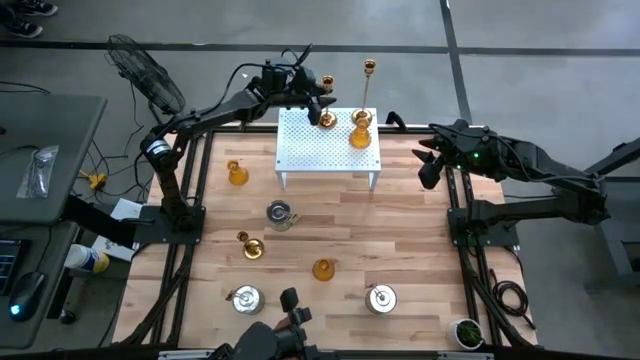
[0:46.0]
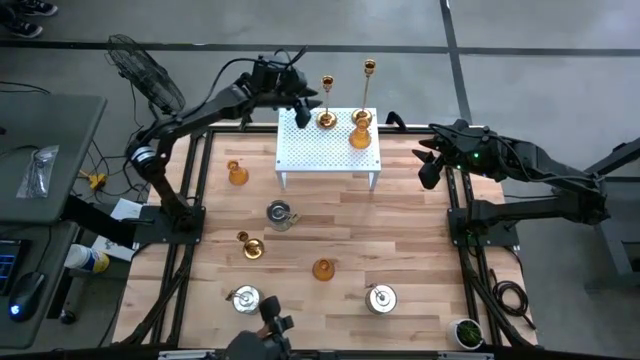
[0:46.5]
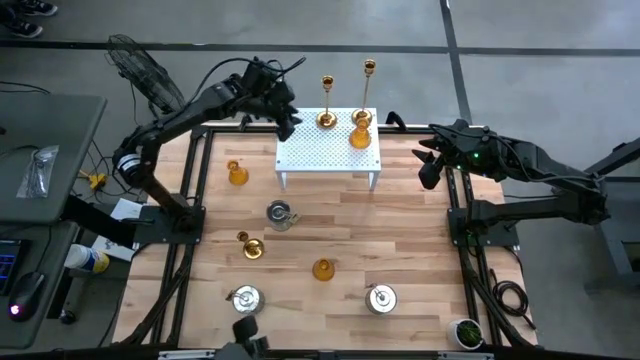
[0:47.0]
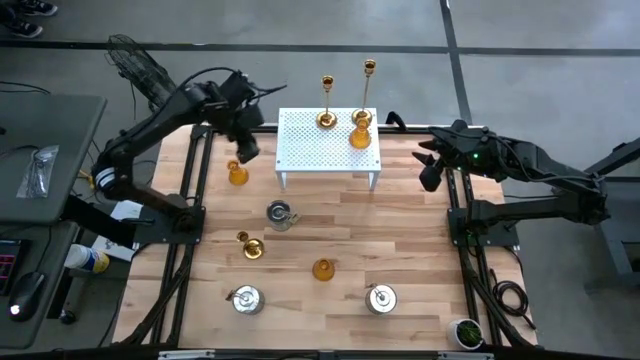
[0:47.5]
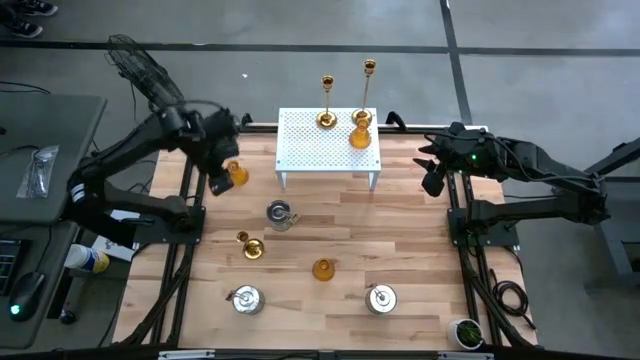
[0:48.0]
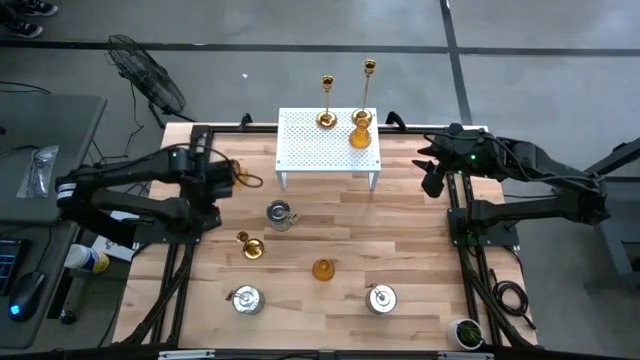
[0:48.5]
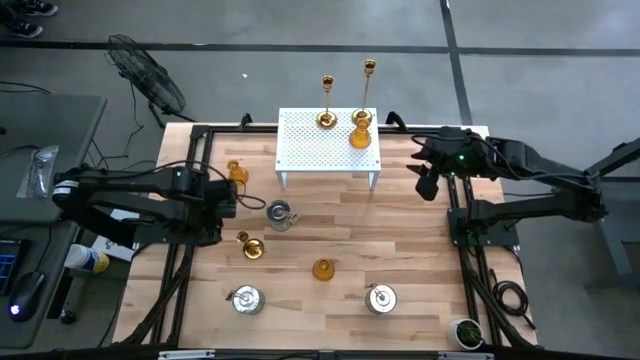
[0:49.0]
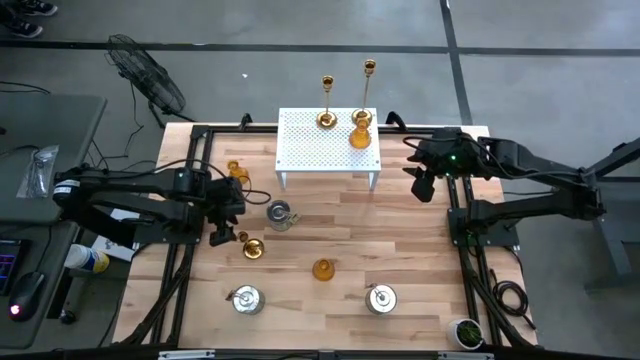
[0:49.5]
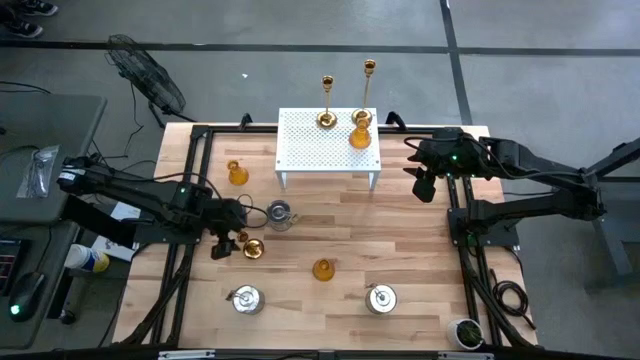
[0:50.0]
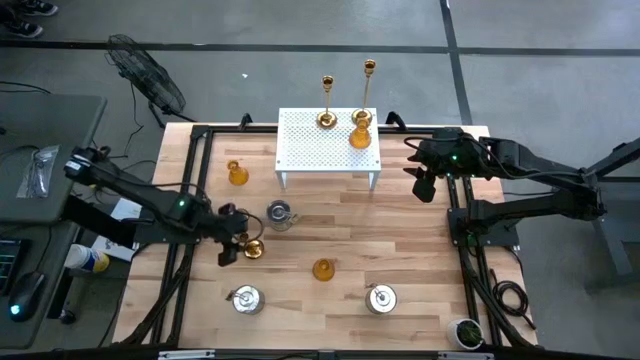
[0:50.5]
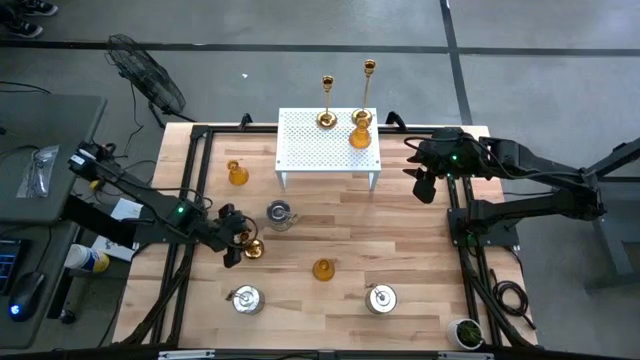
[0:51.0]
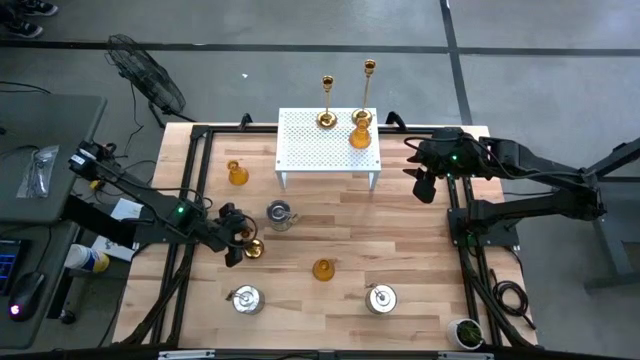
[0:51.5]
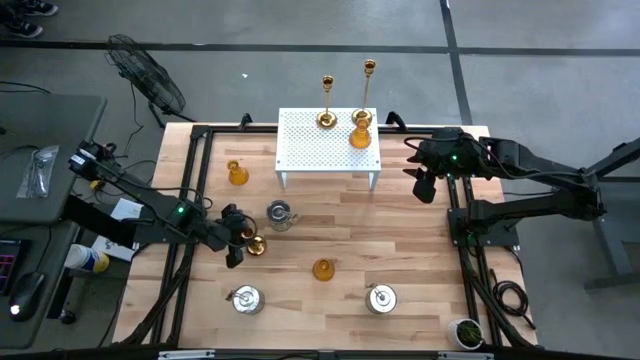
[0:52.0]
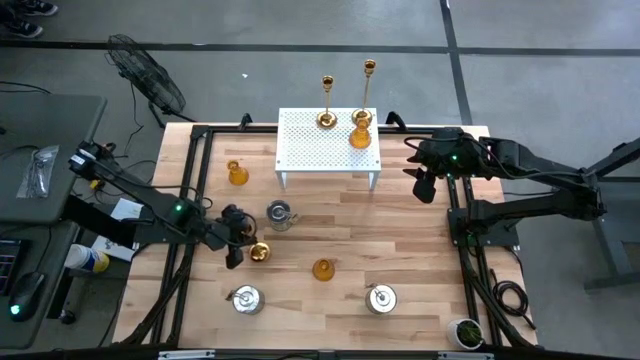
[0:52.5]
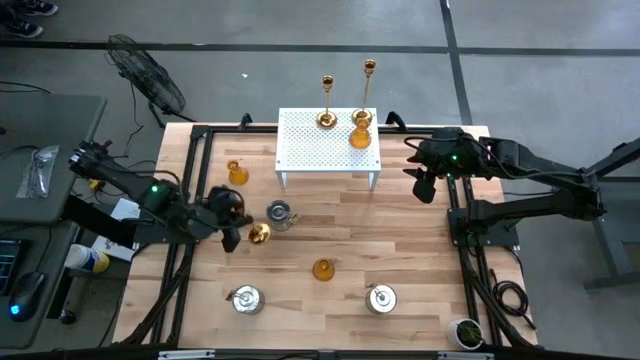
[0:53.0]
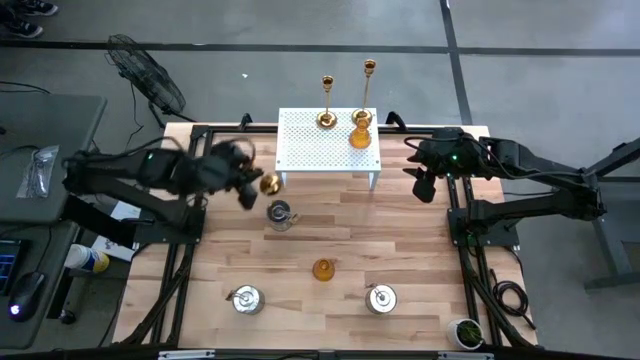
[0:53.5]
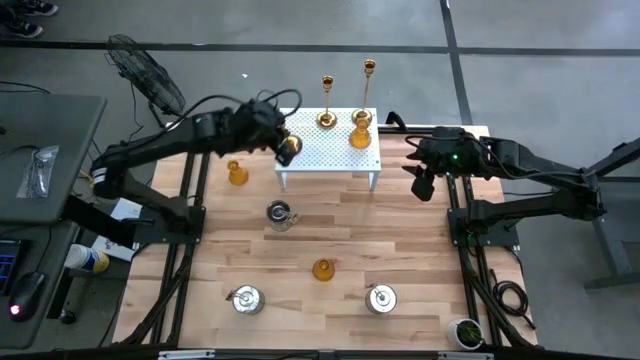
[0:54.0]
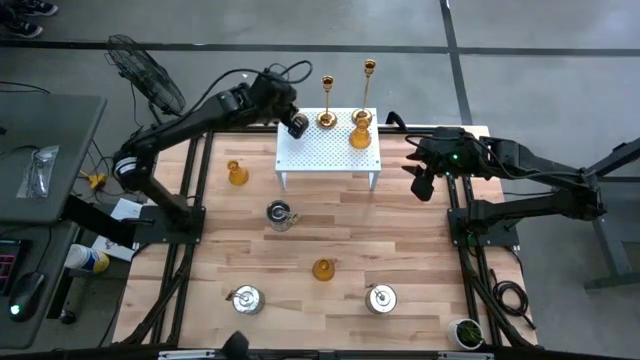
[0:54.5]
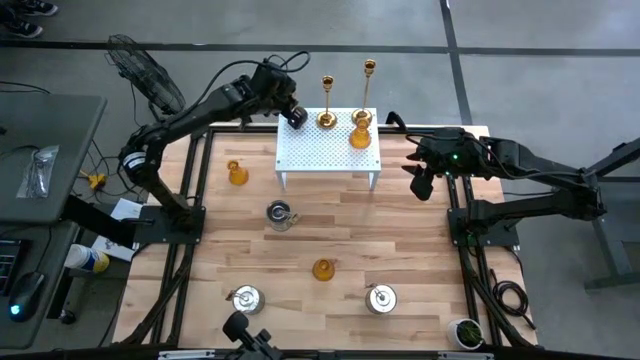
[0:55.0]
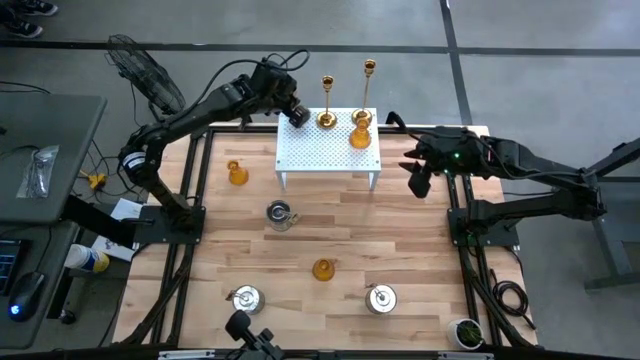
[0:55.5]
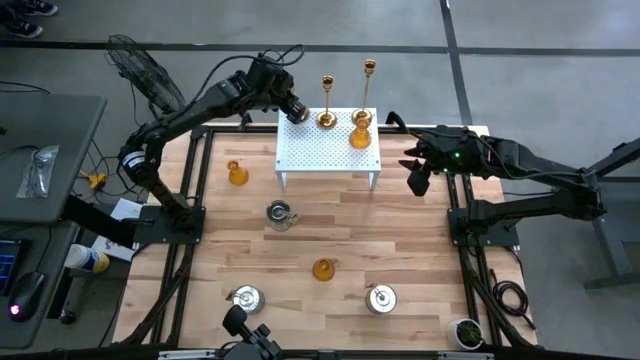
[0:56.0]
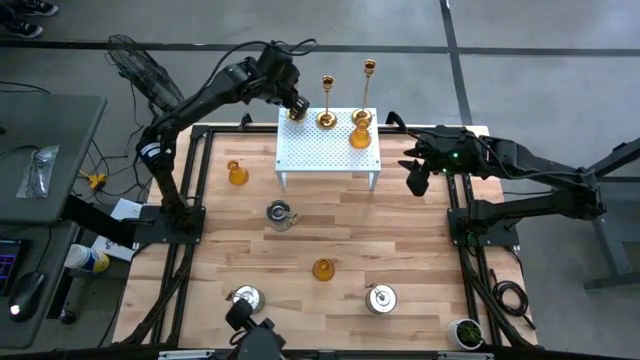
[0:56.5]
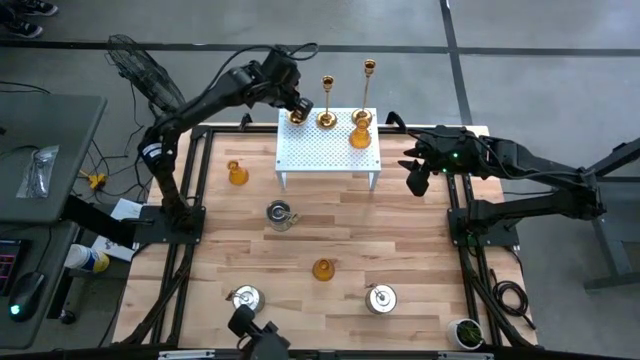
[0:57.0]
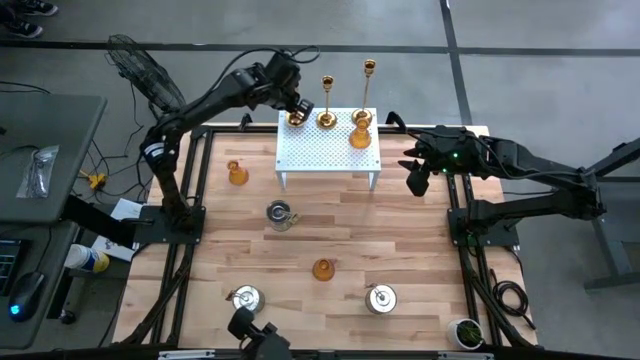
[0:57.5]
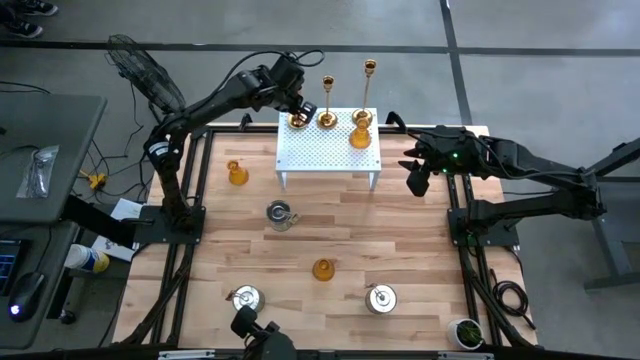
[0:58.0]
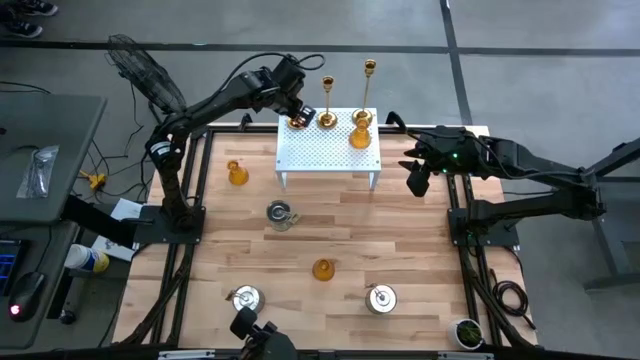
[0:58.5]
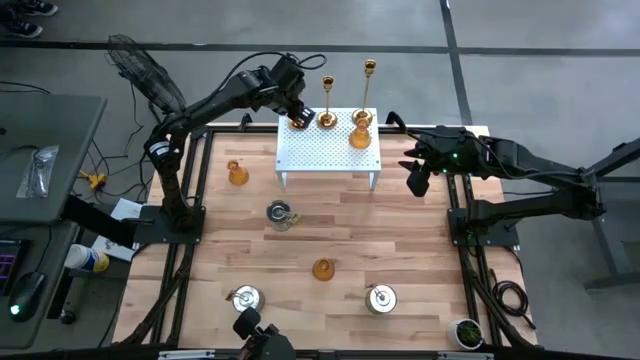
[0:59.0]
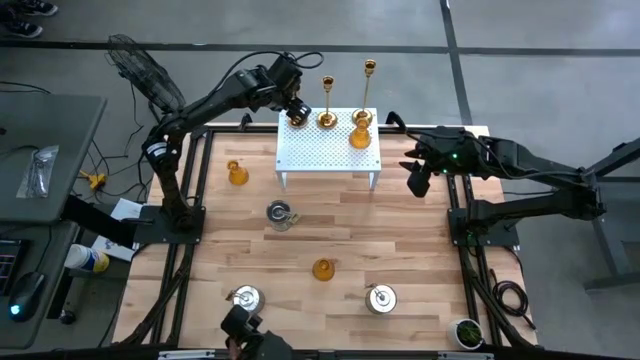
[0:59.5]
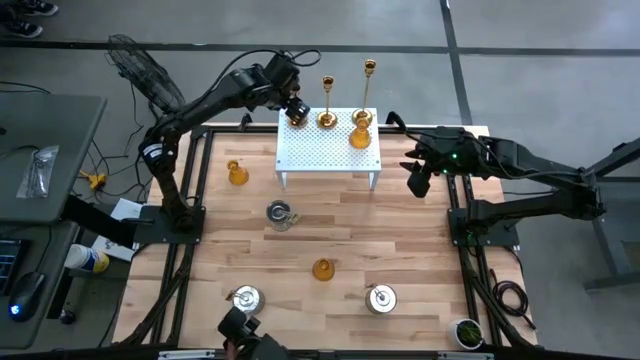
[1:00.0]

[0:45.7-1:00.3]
Task: Pick & Place candle stick holders
Put the gold candle holder on the shelf aligned with the other gold candle holder

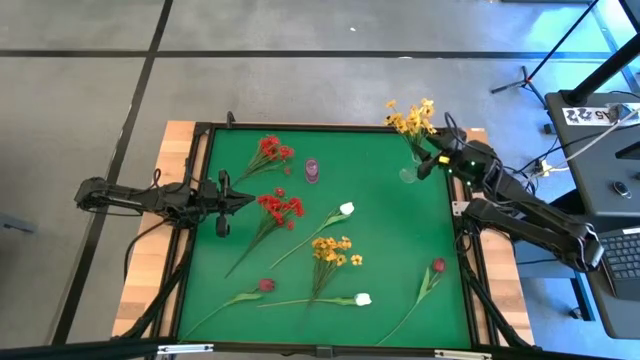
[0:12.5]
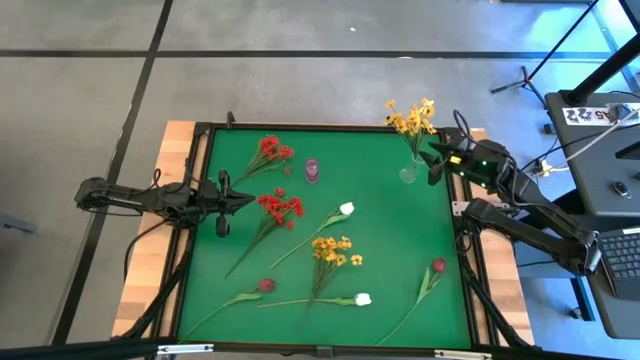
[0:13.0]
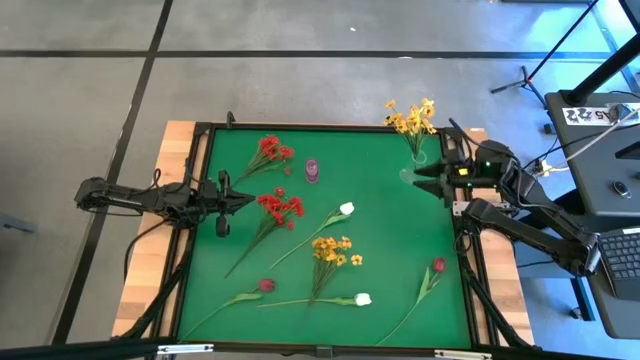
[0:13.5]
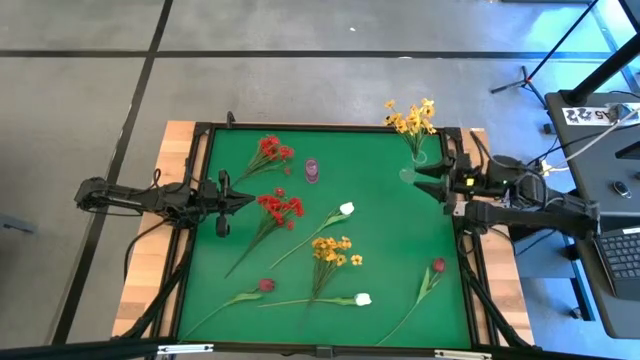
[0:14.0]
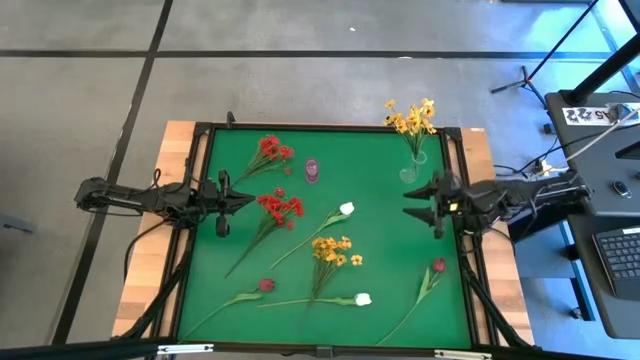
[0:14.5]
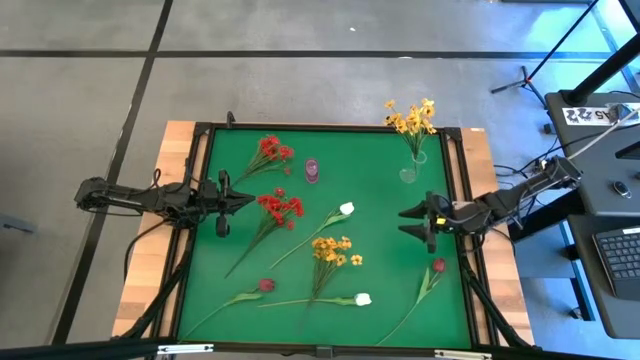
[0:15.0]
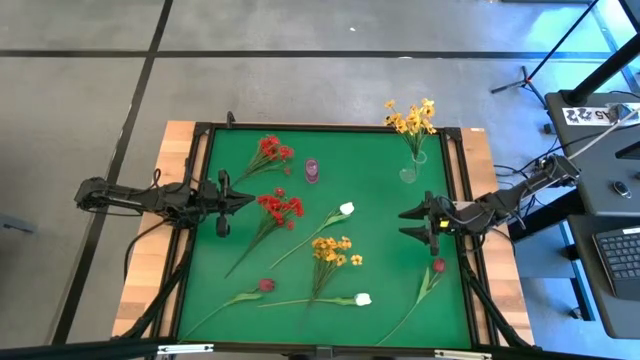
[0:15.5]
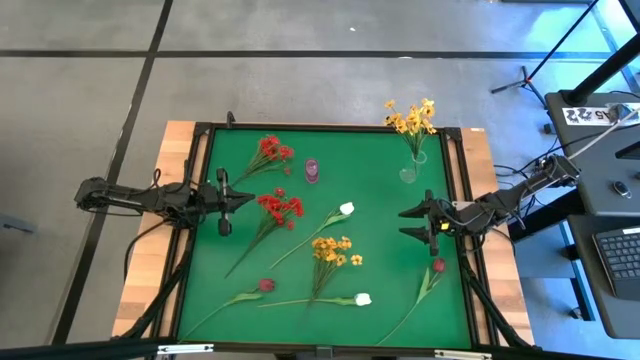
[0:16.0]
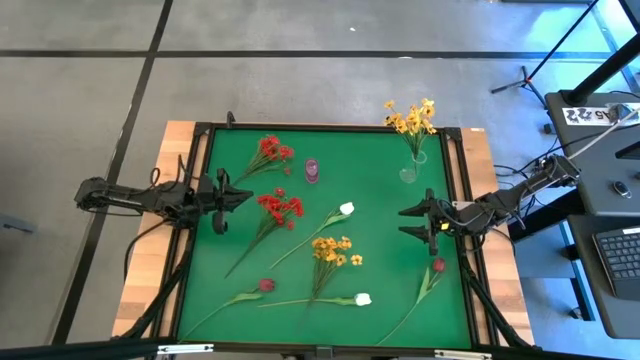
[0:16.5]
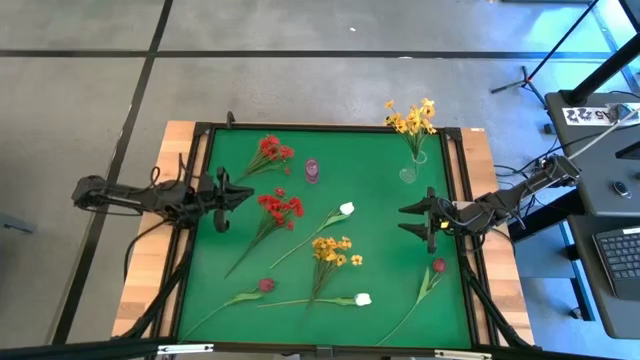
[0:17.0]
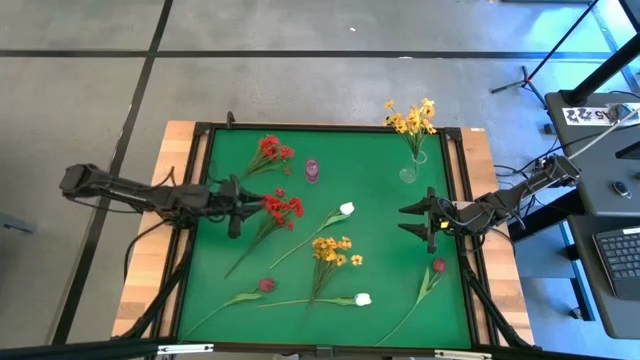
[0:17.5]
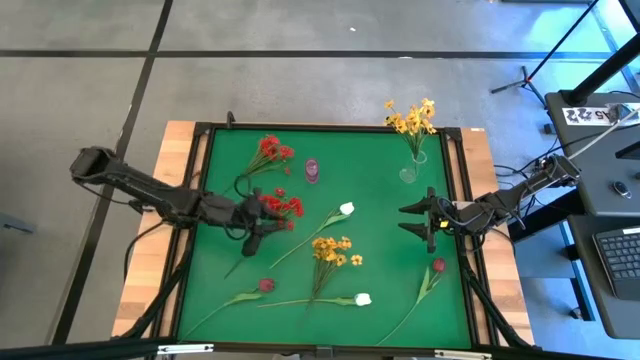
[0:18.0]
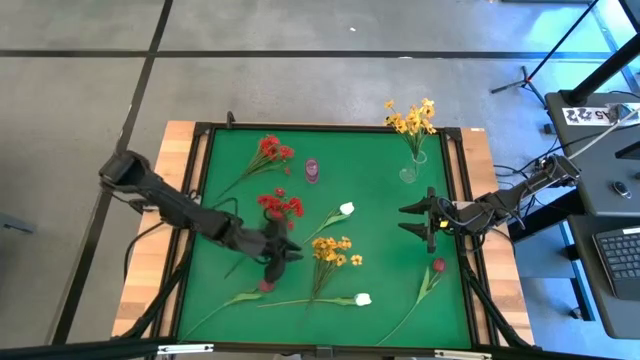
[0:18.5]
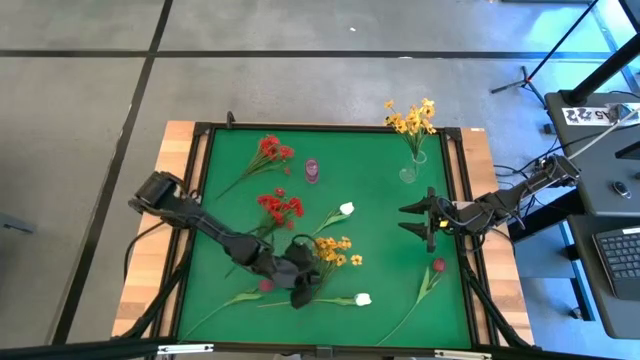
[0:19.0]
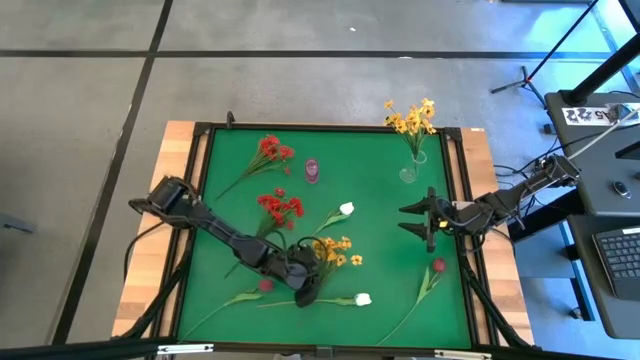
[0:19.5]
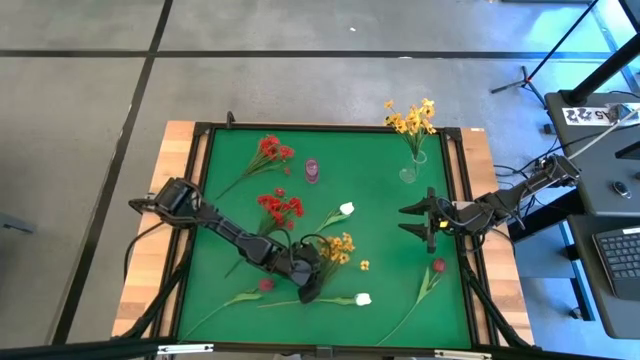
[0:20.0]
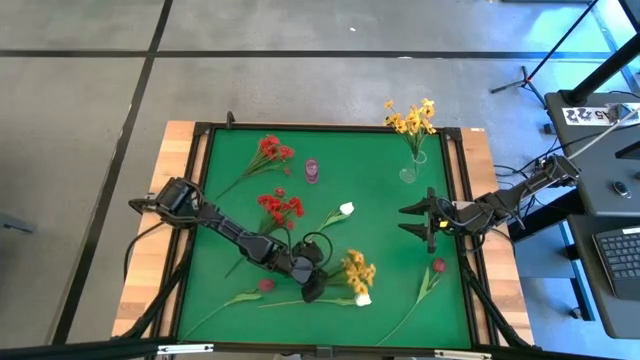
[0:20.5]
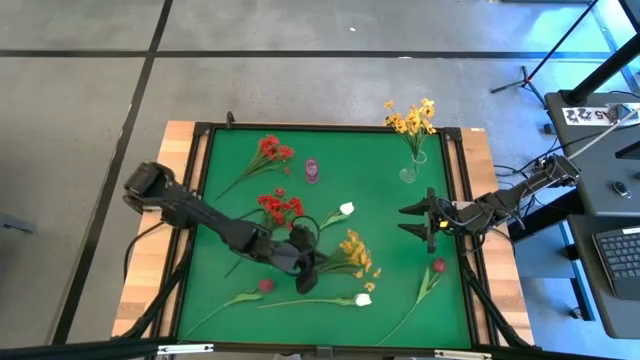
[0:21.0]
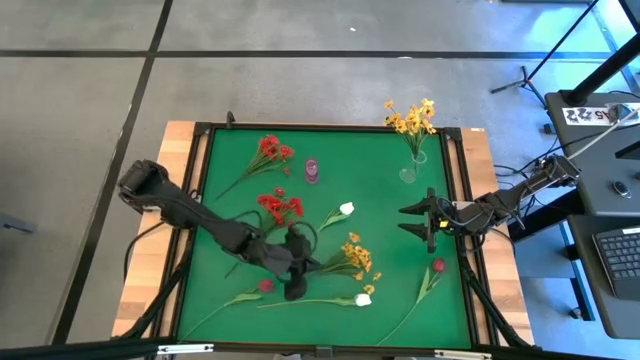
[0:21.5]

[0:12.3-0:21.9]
Task: Sort flowers into vase by color
Put the yellow flowers into the transparent vase
